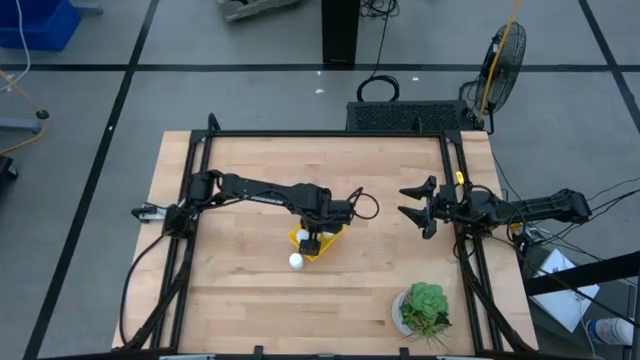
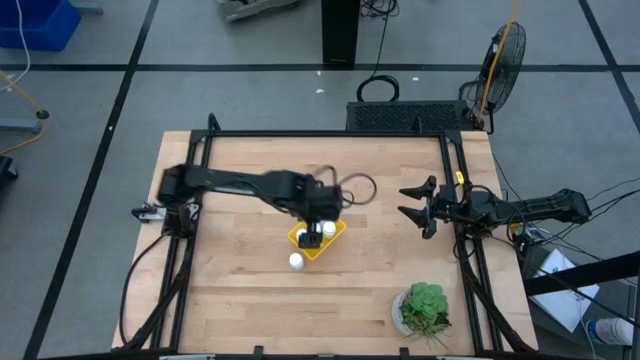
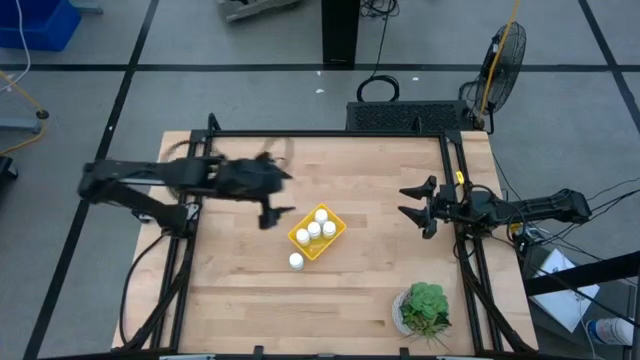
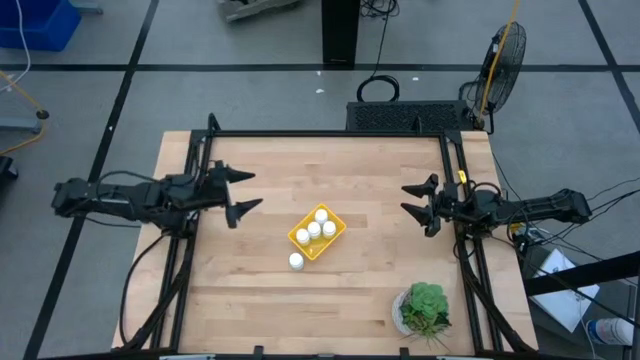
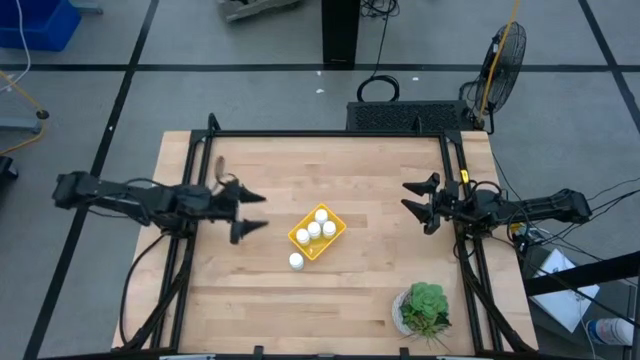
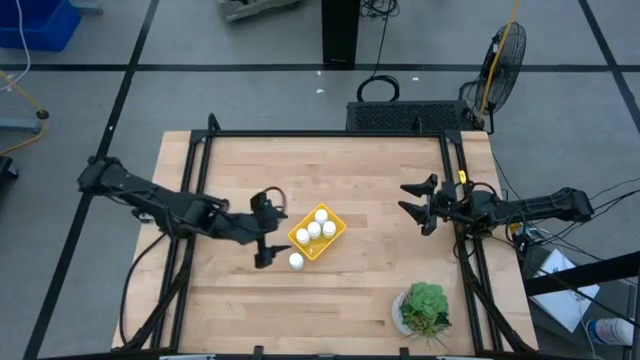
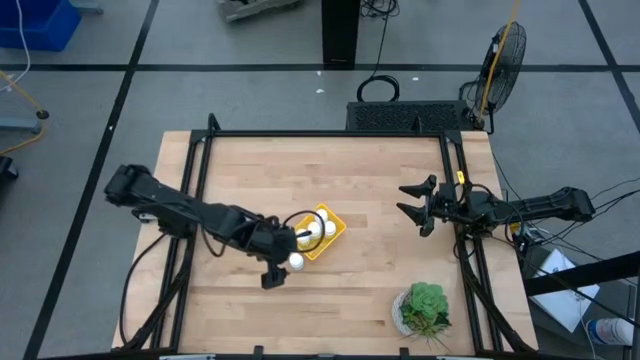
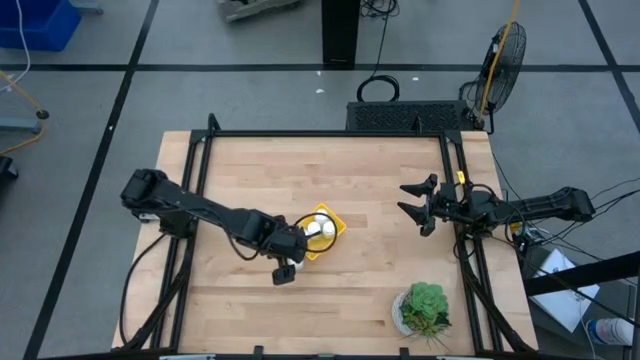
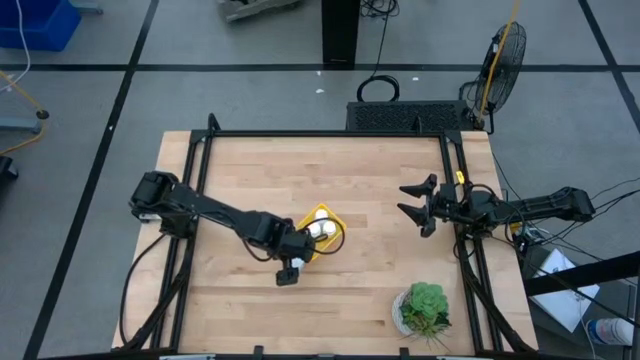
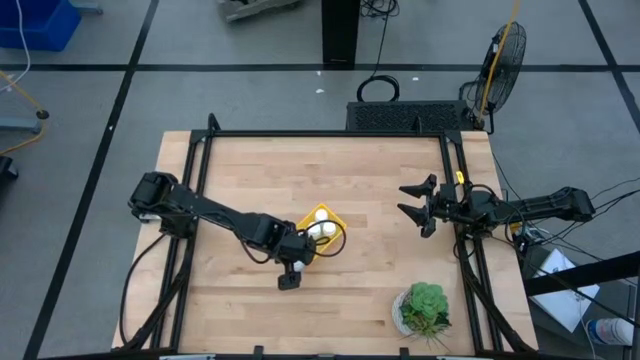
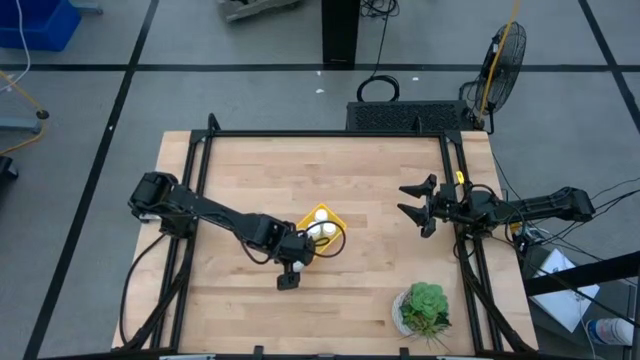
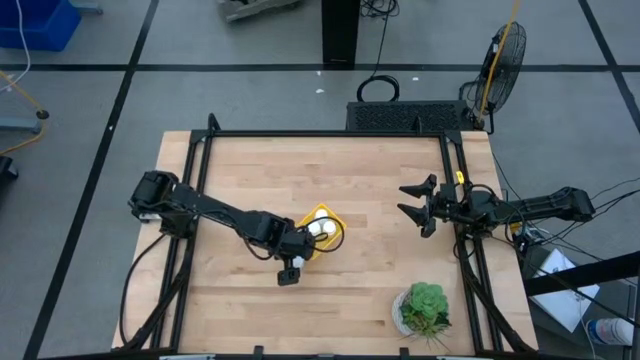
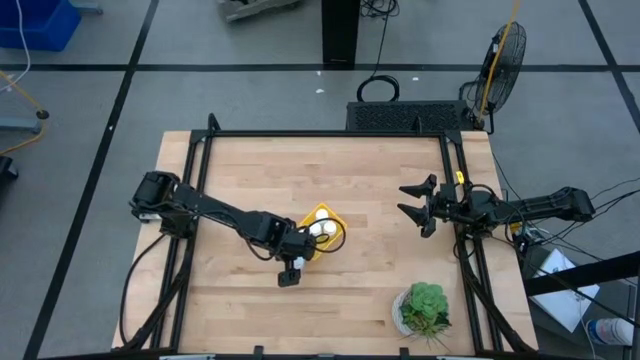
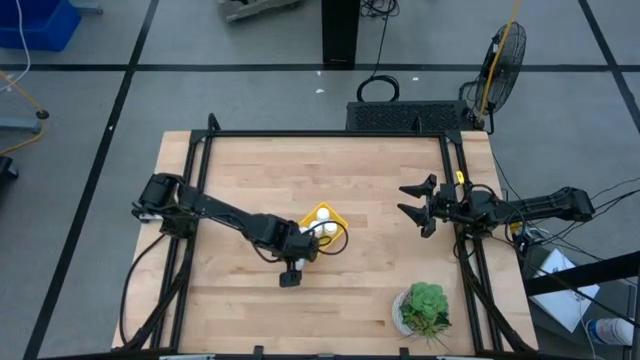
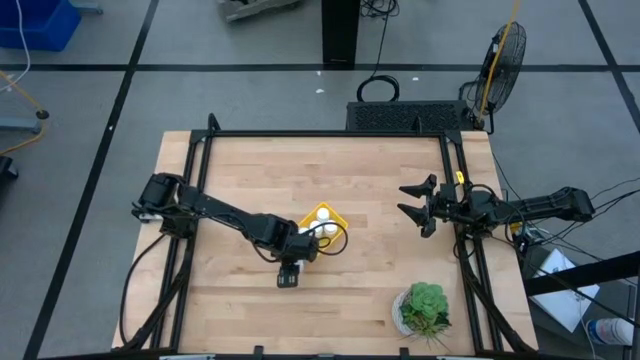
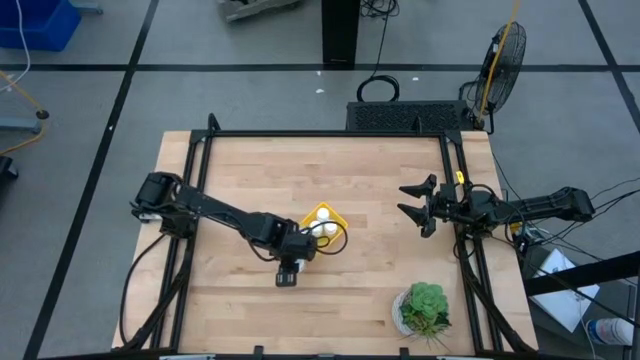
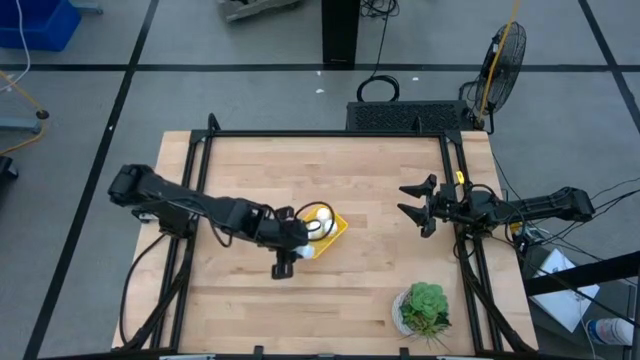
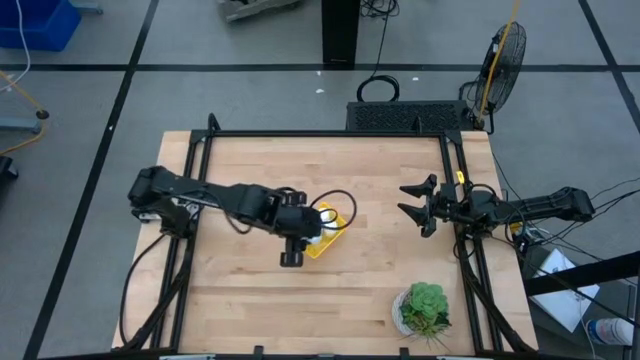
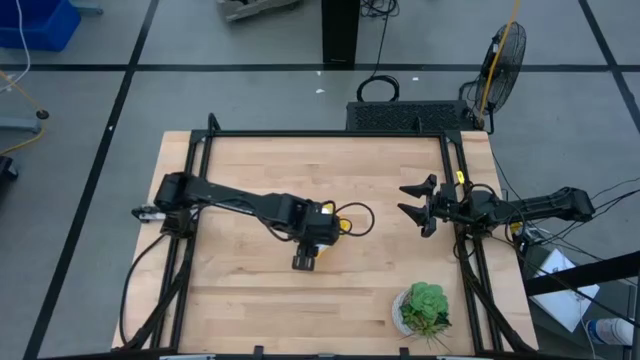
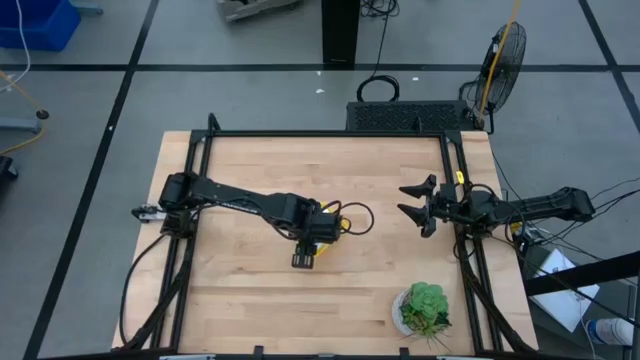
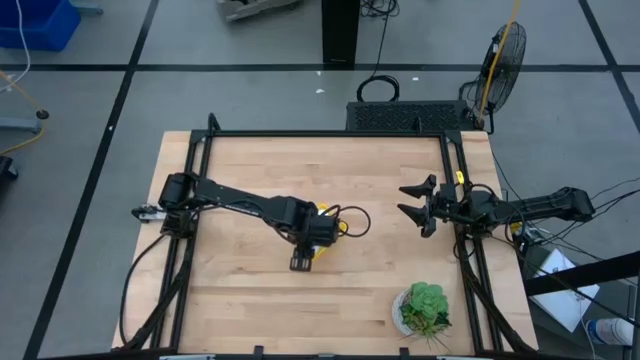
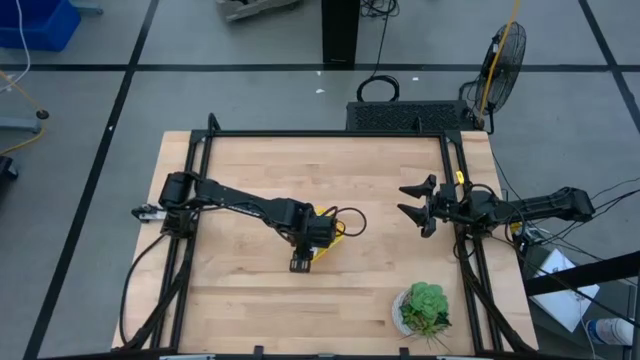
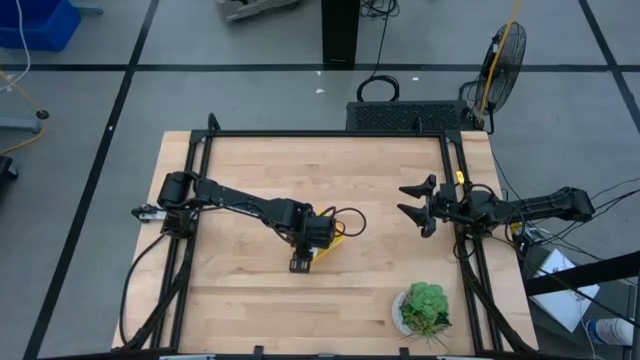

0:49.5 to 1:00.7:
Task: Pick and place pill bottles into a basket
Put the white medicine bottle into the yellow bin

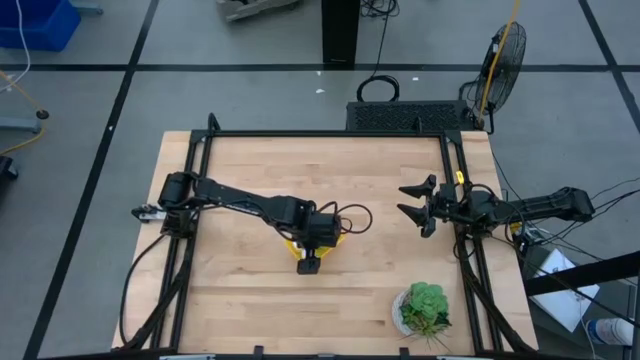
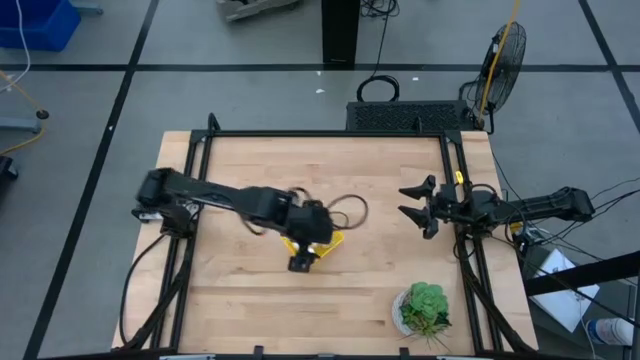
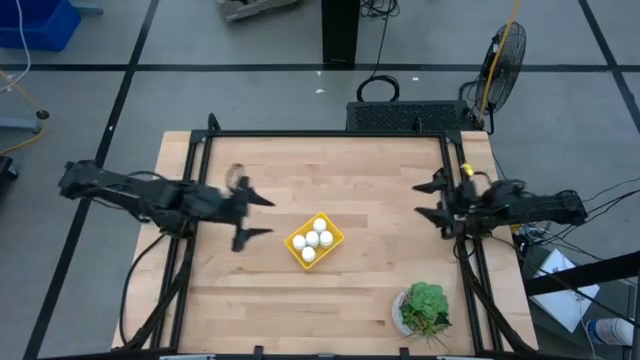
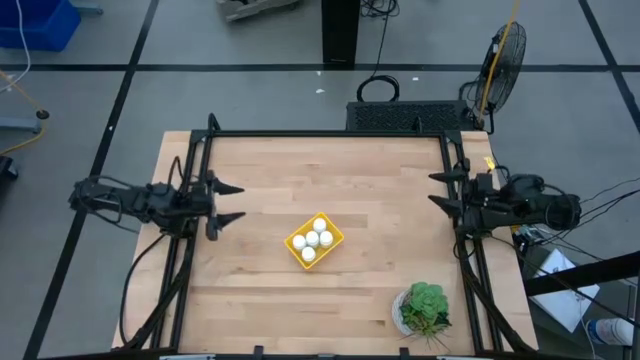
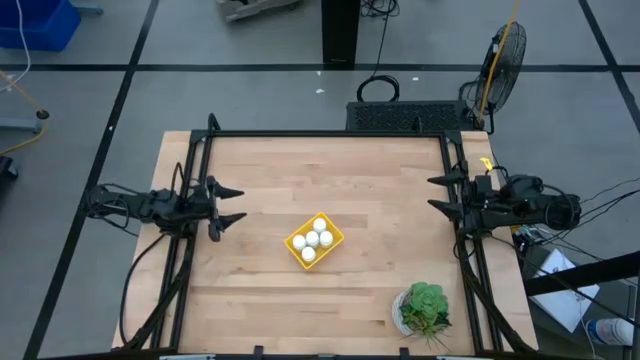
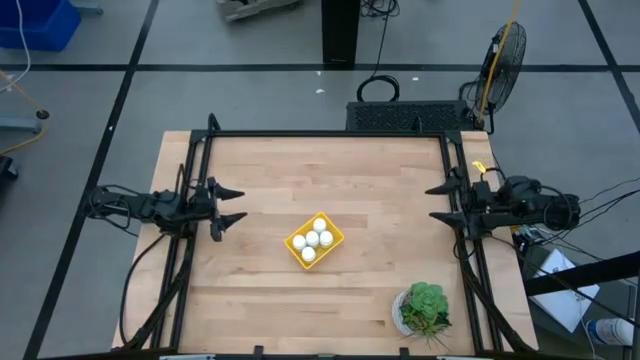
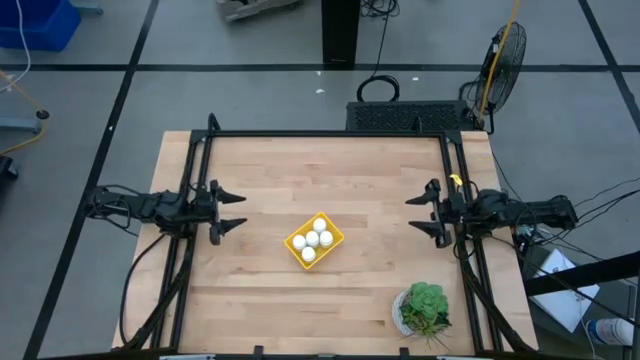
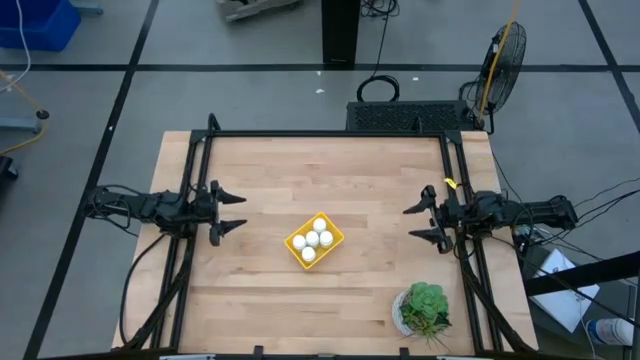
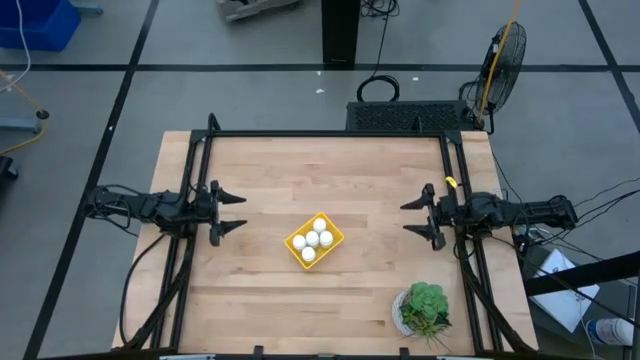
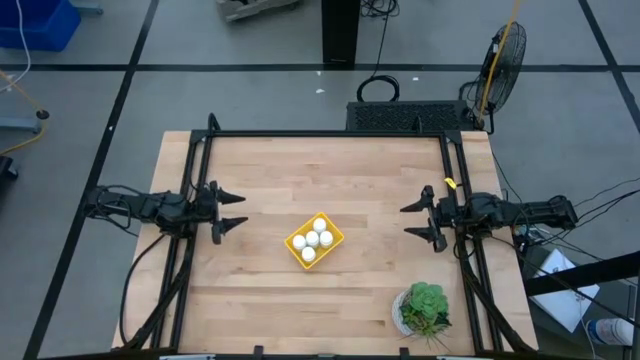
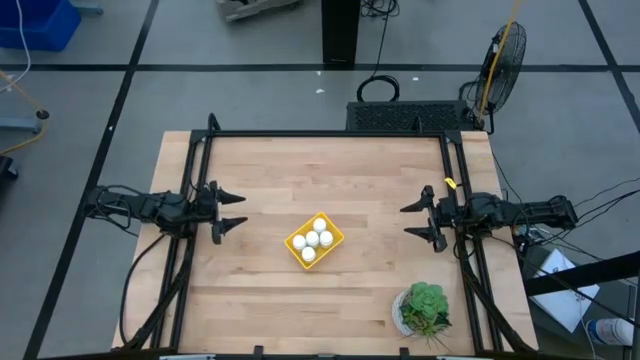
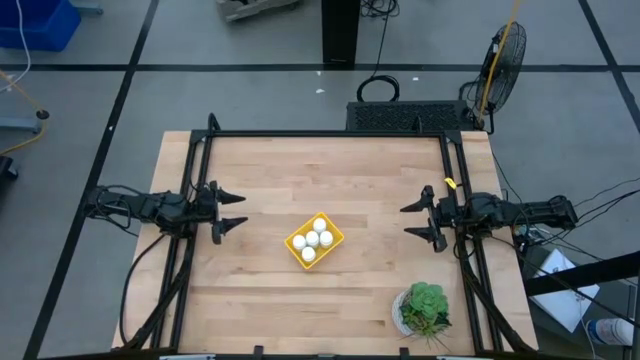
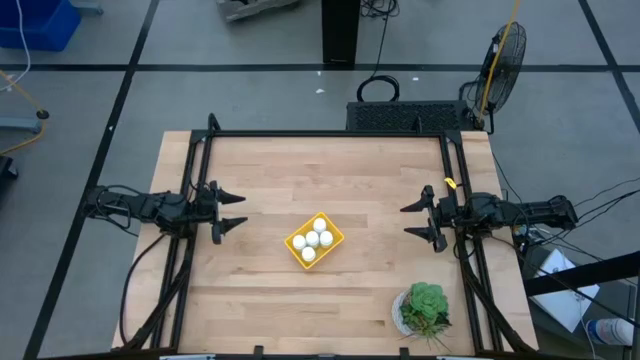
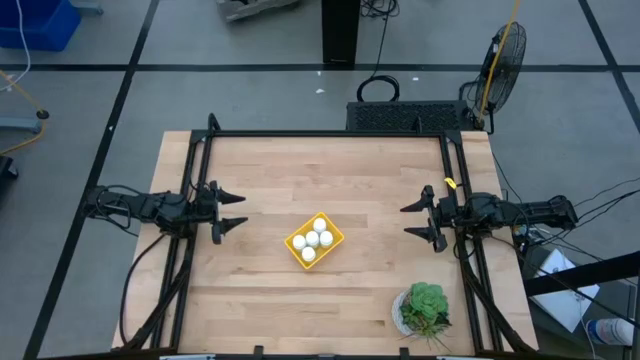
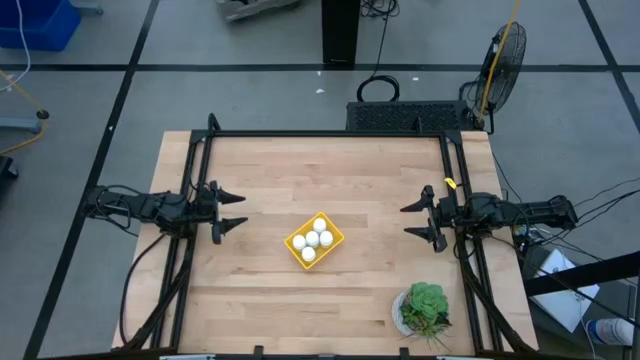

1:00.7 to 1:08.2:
Return to Home Position

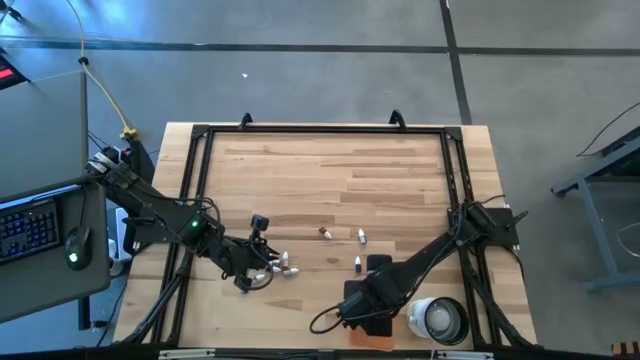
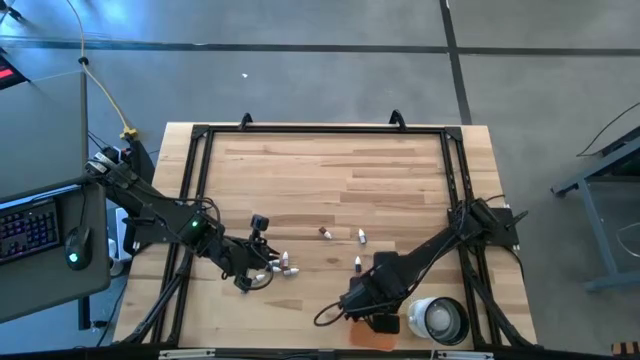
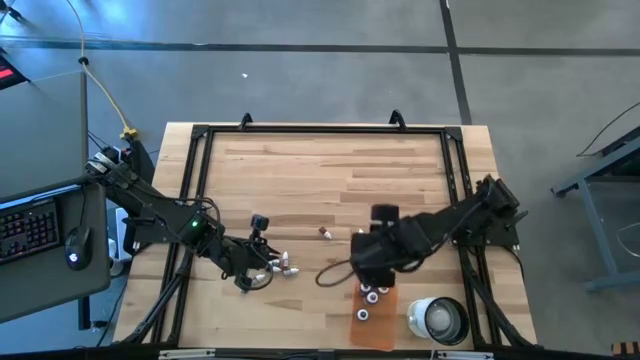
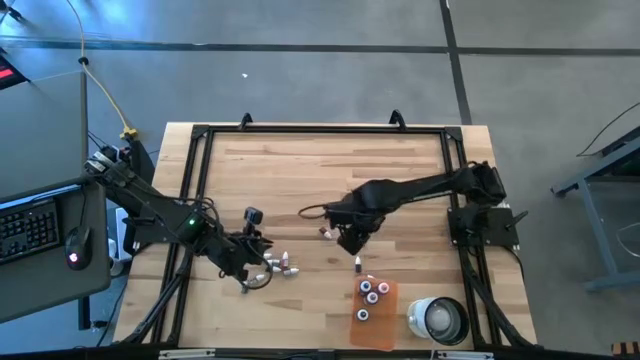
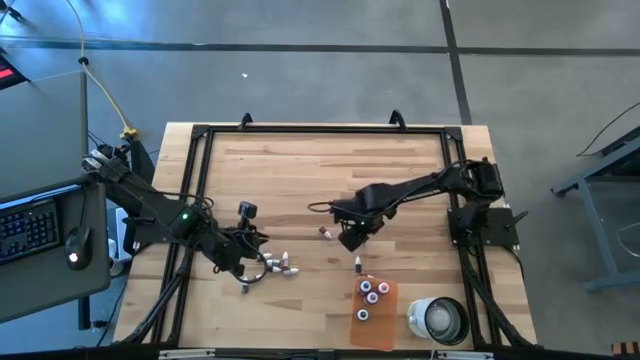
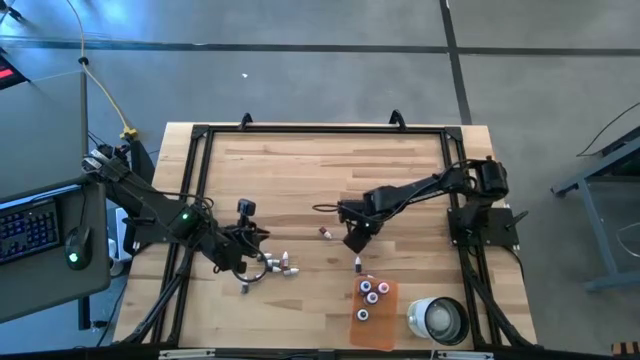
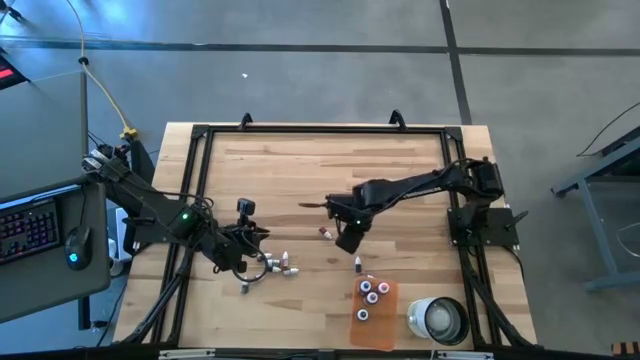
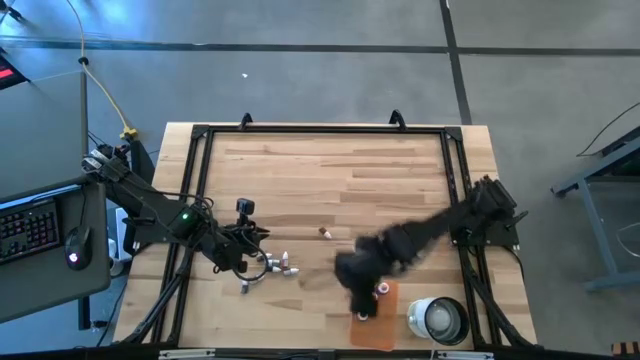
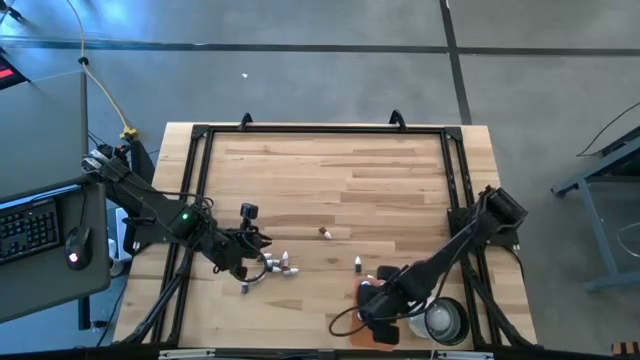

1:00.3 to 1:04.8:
Task: Pick & Place food coloring
Put the top small black food coloring bottle into the orange bin
